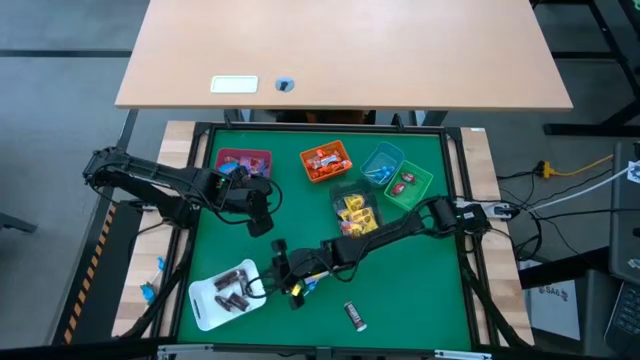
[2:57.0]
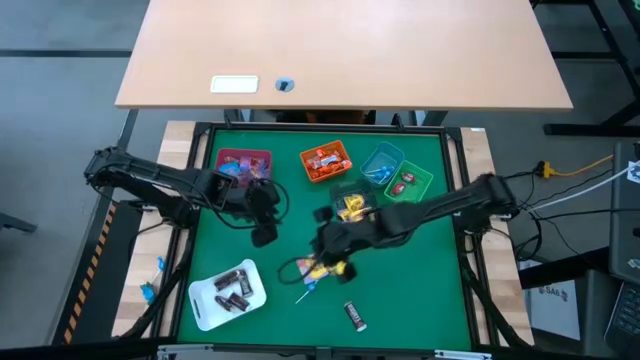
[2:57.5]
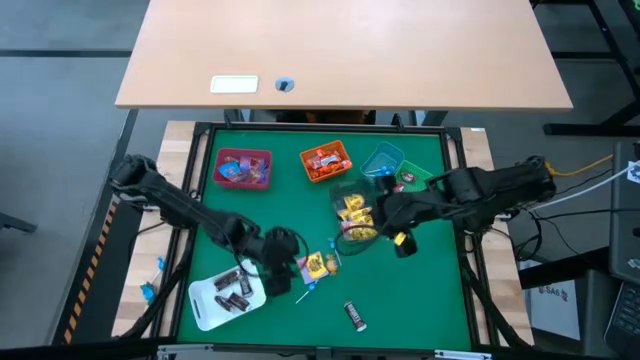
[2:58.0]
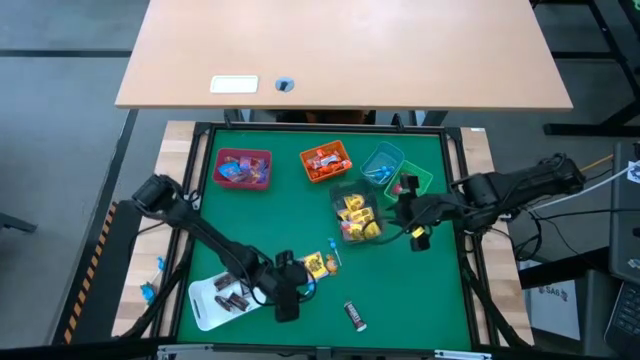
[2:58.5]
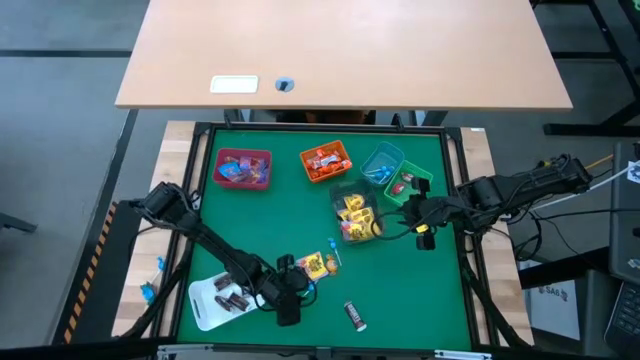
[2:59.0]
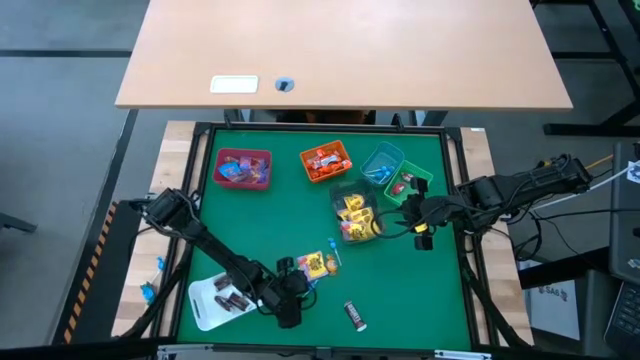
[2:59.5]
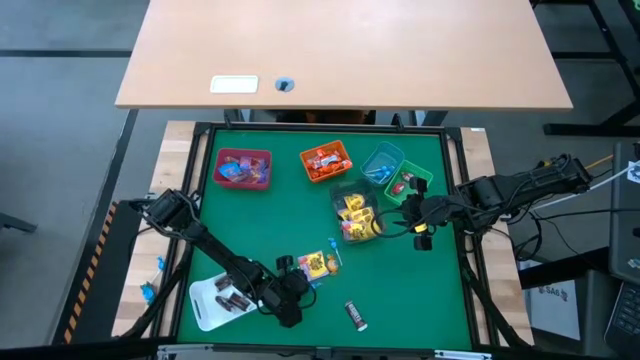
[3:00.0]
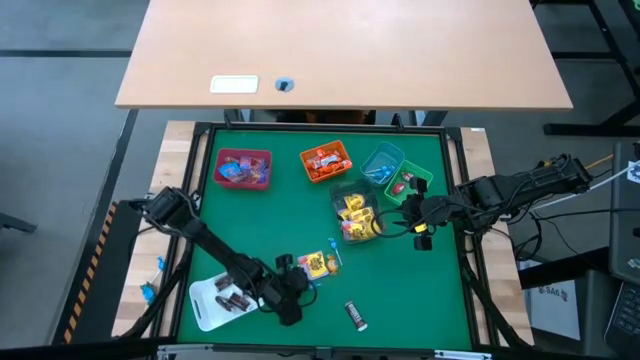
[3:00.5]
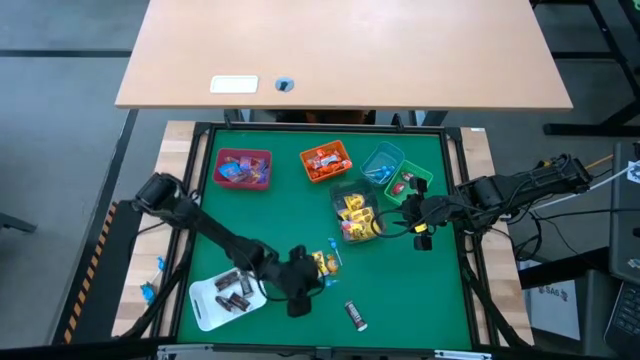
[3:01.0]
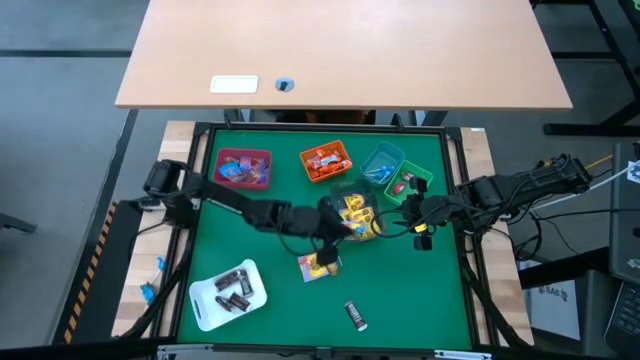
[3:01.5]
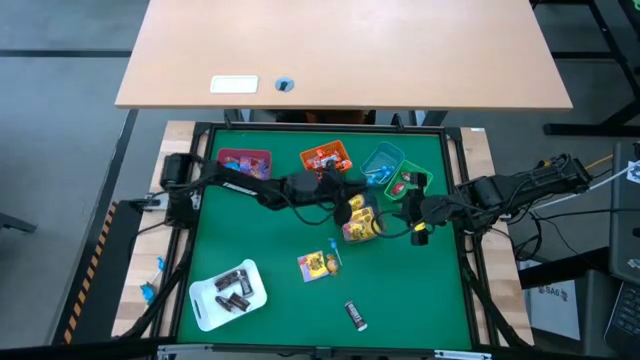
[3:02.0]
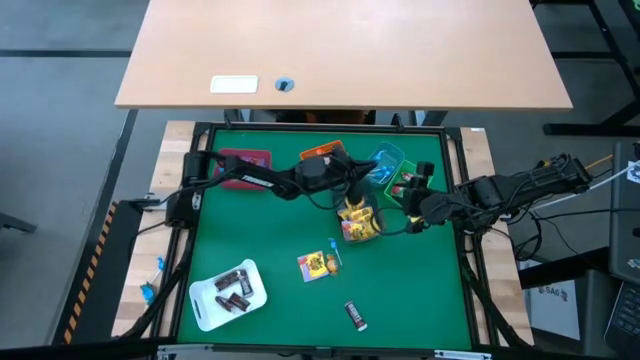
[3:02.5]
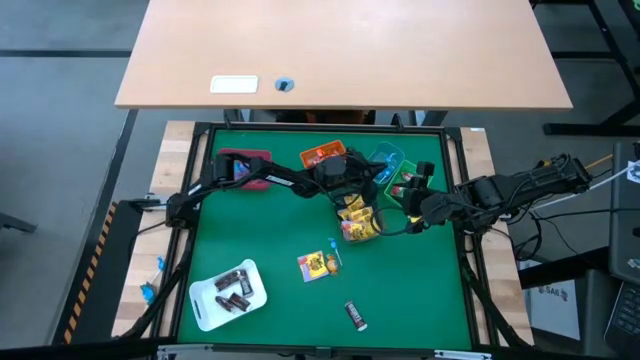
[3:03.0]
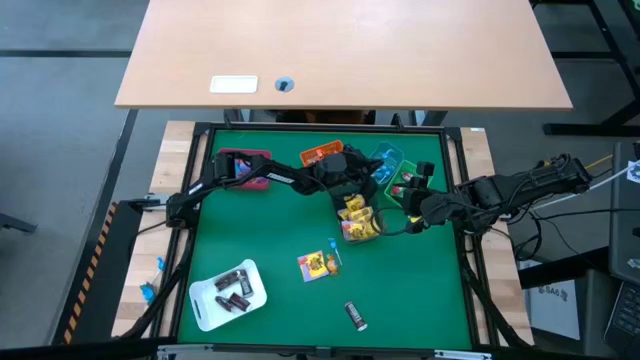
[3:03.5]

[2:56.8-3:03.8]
Task: Sort candy
Put the blue lollipop into the blue bin

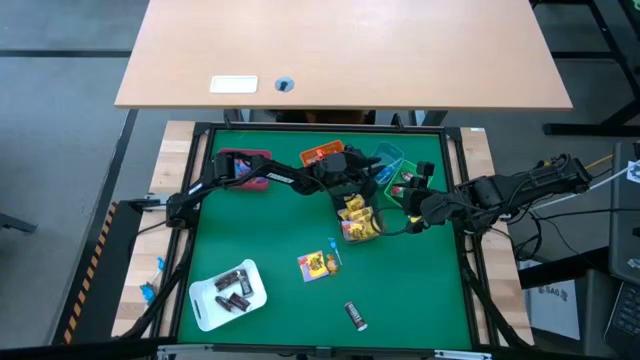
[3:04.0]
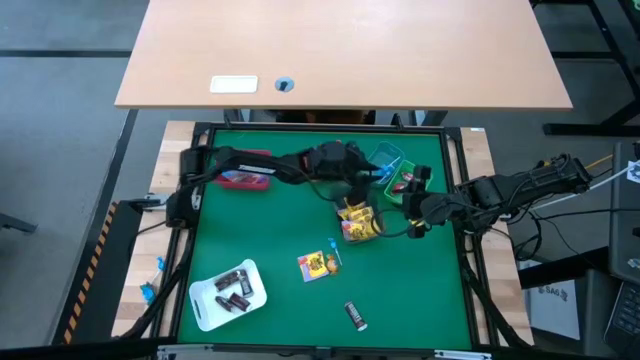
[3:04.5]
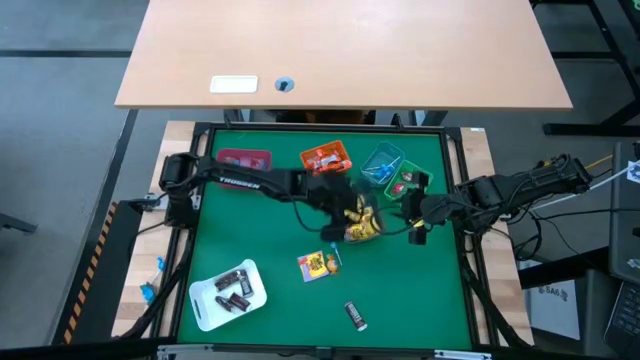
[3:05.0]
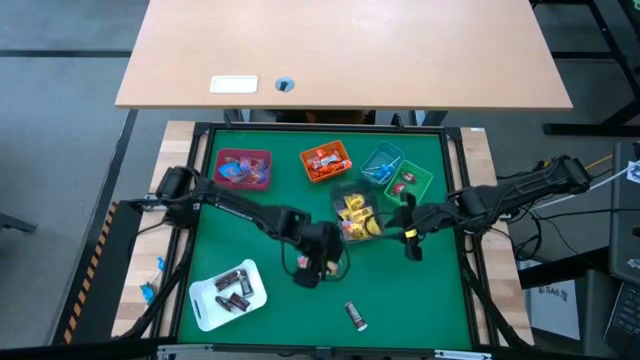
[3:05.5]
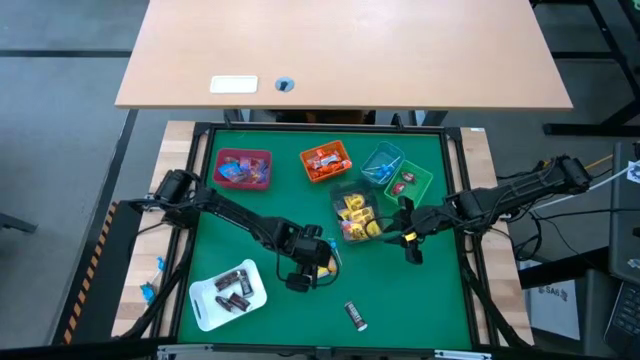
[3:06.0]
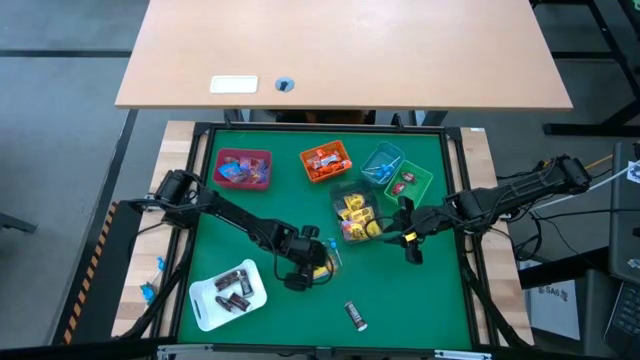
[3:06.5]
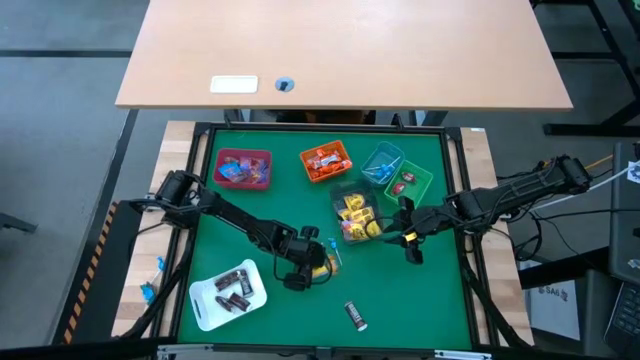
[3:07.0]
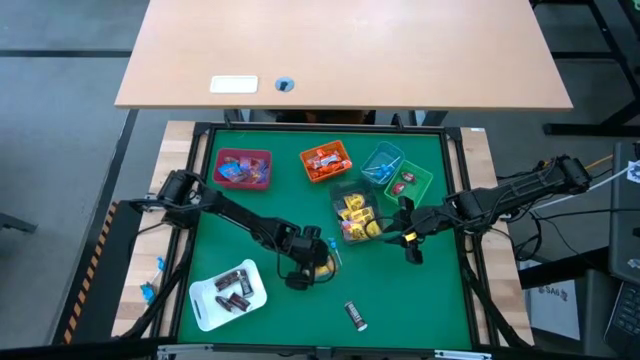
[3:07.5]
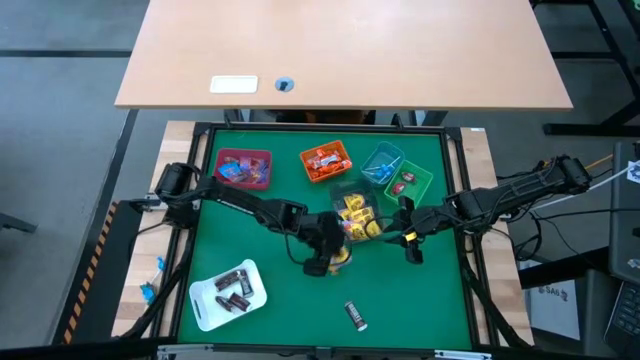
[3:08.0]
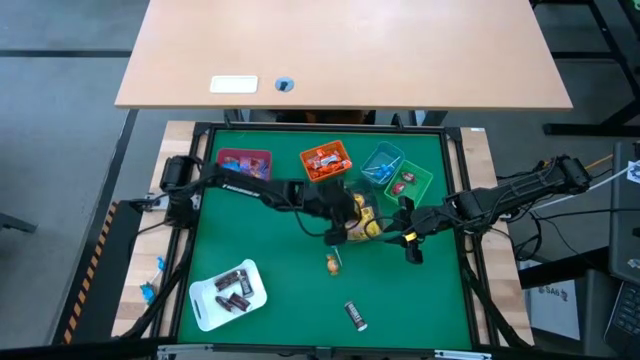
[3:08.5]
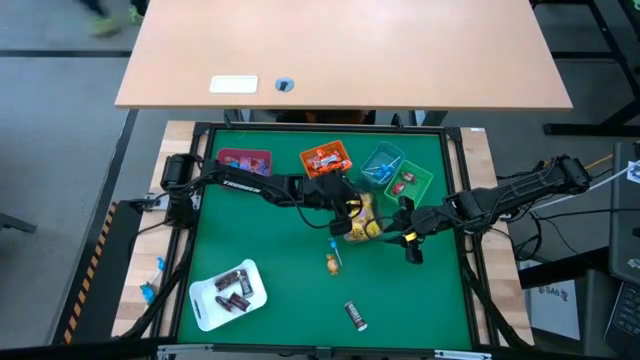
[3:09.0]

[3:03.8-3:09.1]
Put the yellow candy pack into the black bin

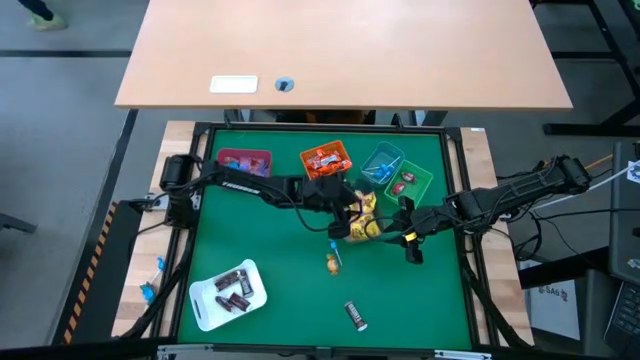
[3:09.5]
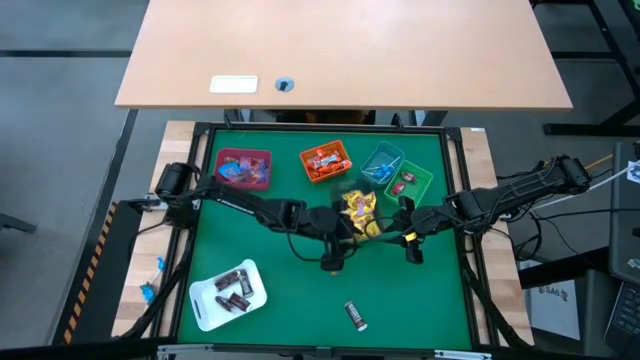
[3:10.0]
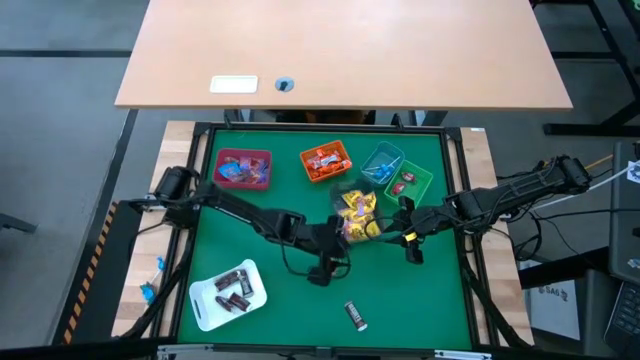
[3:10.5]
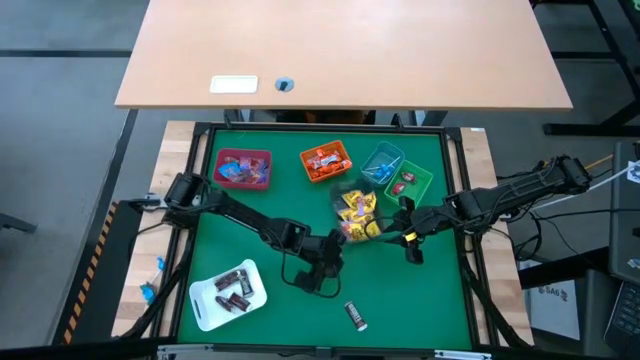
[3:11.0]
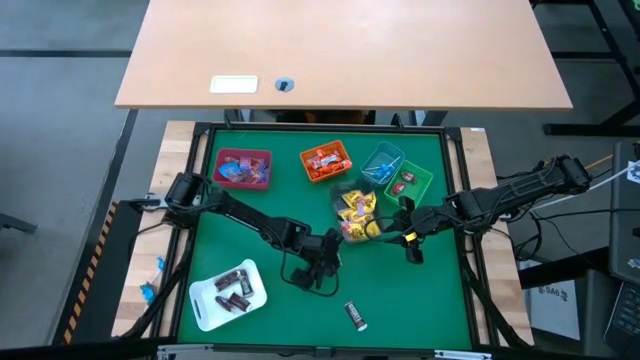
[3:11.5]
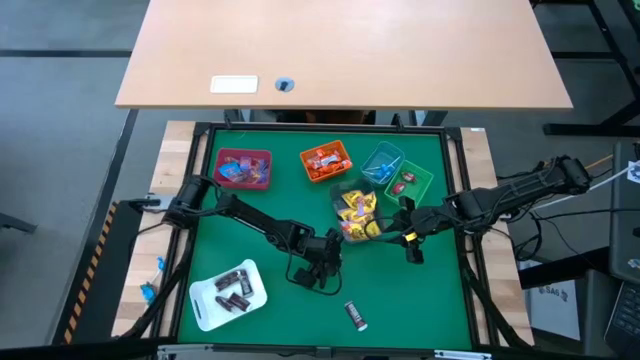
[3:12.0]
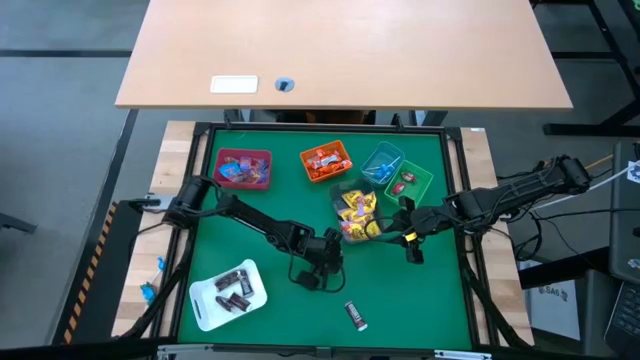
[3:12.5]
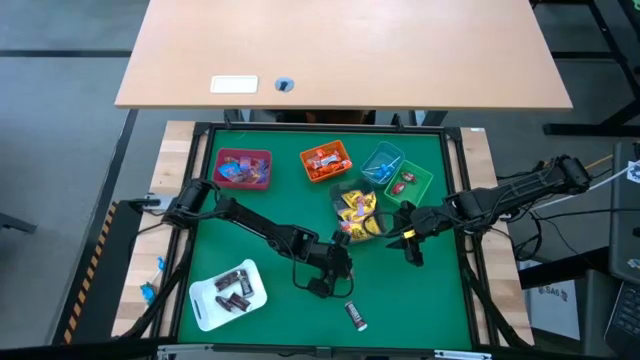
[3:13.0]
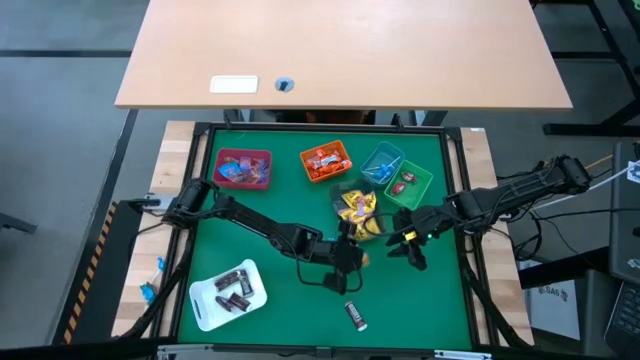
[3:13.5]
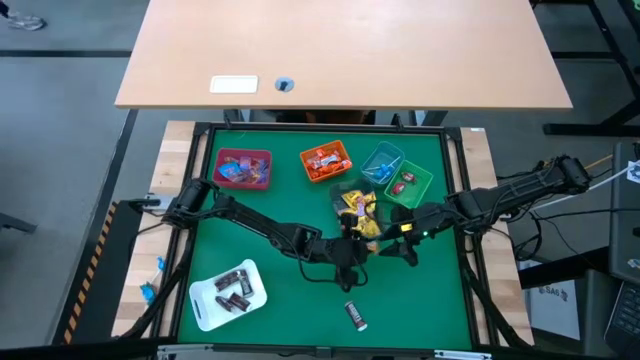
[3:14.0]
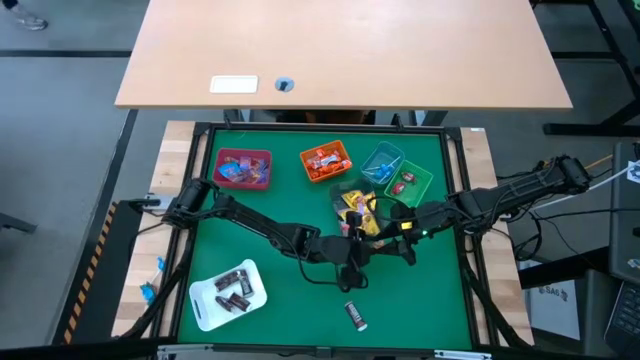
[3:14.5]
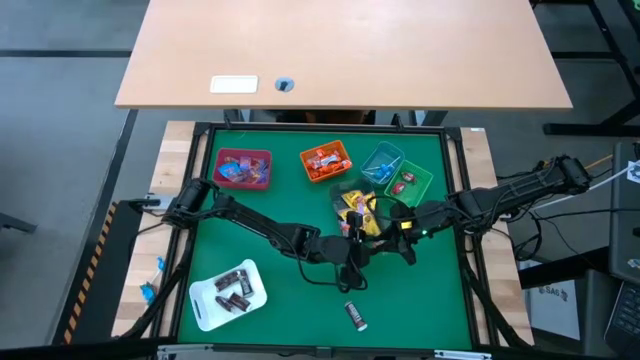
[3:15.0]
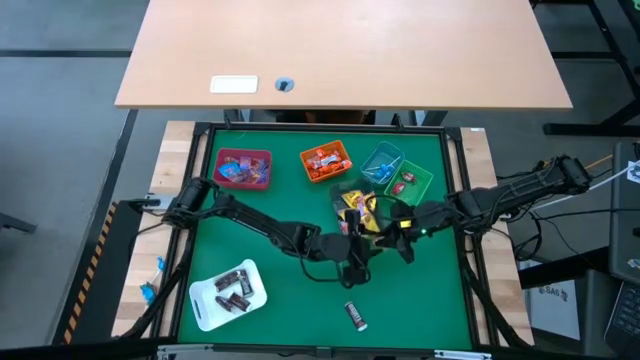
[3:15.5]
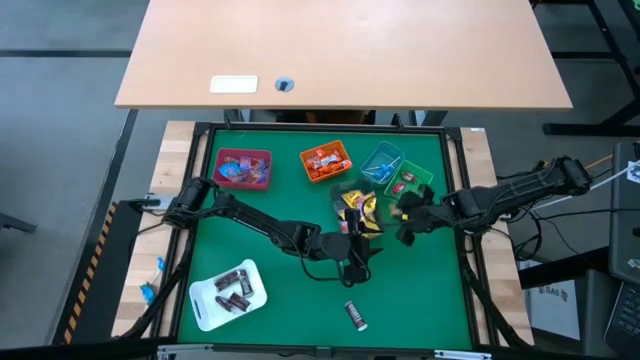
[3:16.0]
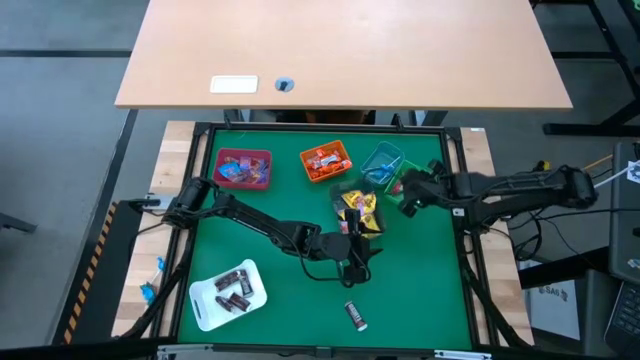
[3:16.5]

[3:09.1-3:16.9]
Put the orange chocolate into the green bin

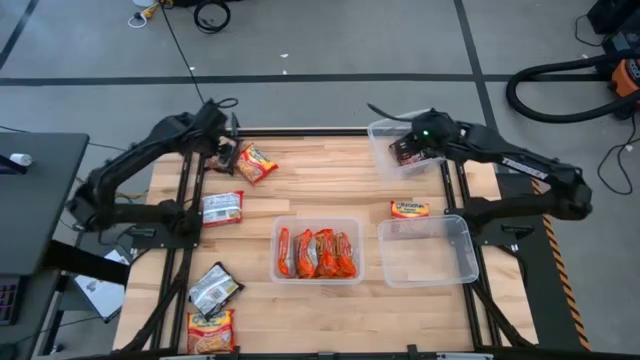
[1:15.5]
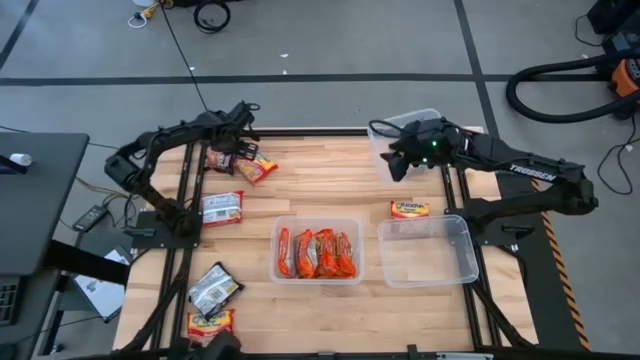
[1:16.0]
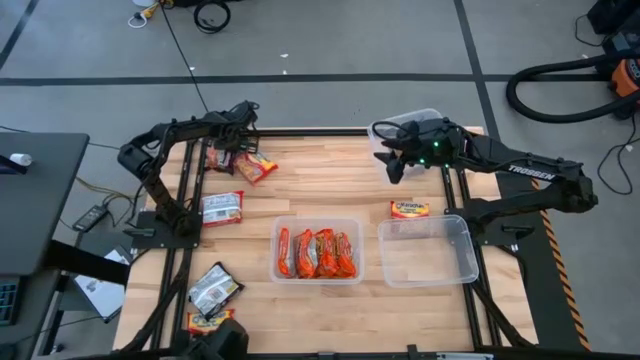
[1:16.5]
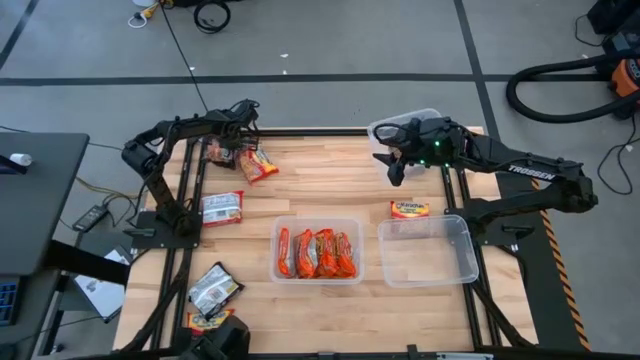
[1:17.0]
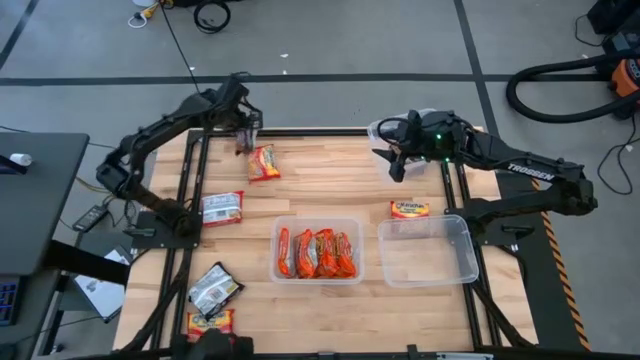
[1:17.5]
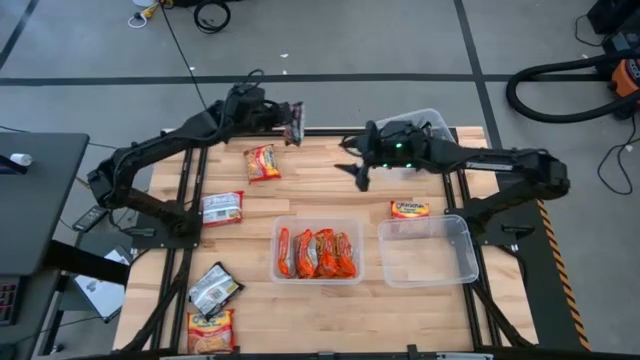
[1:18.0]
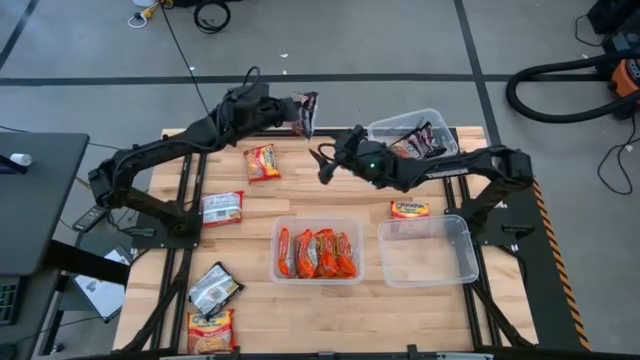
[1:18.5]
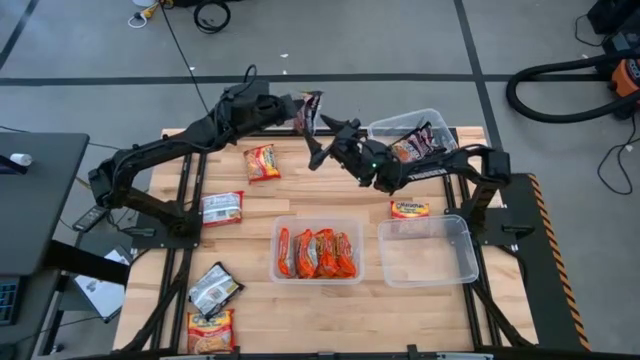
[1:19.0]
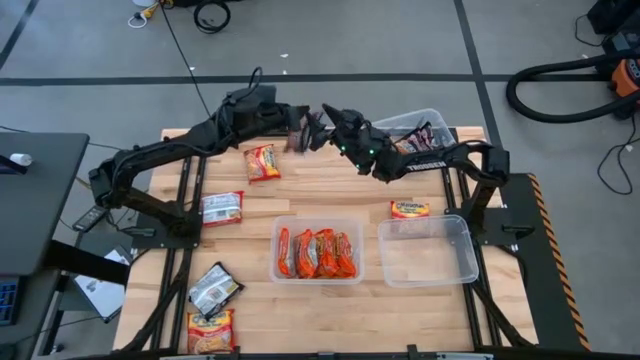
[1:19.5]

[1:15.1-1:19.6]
Task: Sort Maruchan noodles
Put the black noodle pack into the top transparent bin
